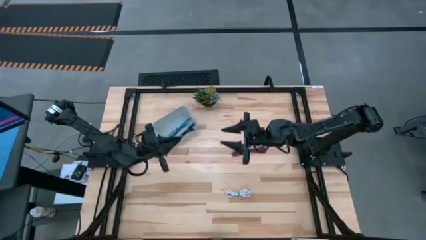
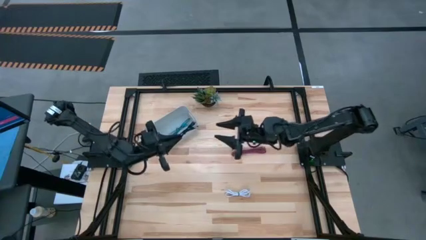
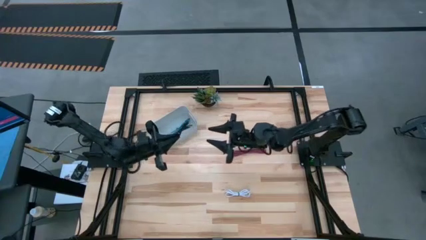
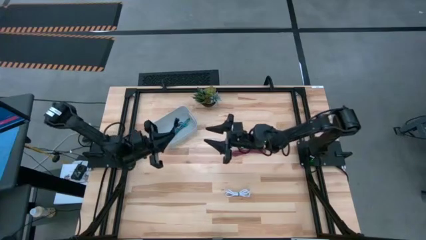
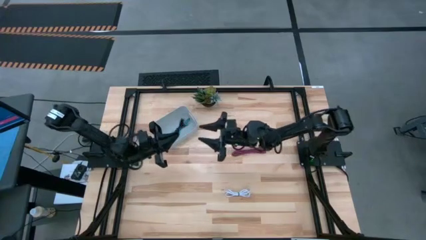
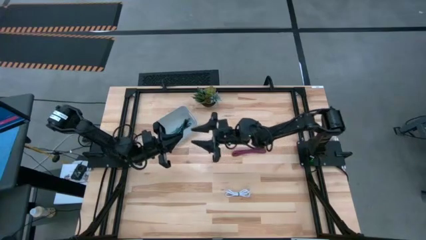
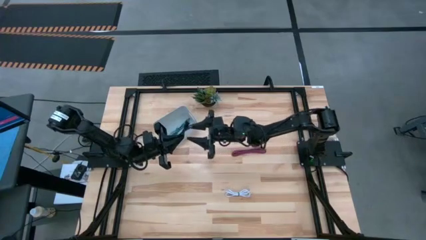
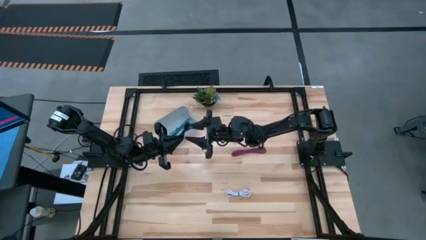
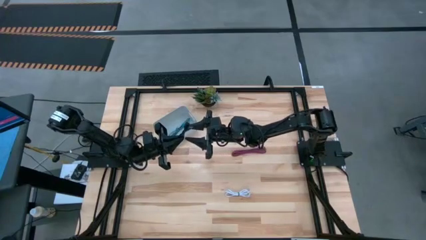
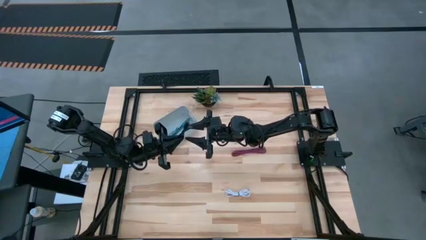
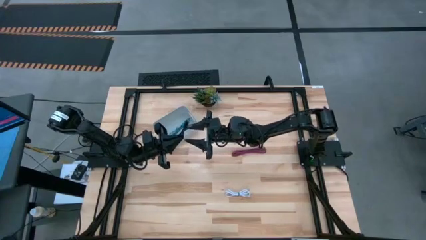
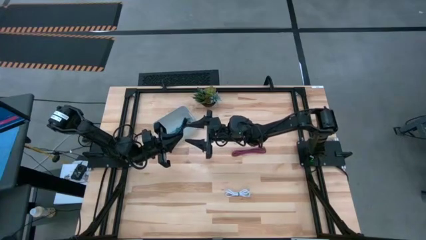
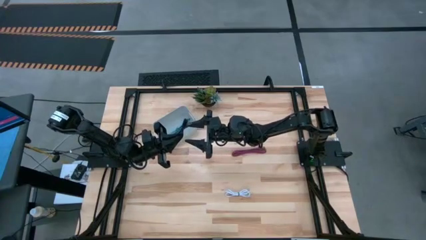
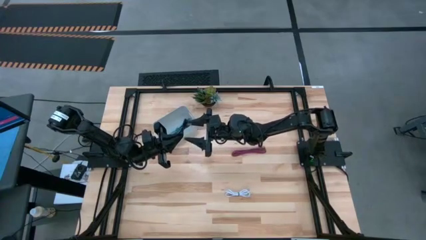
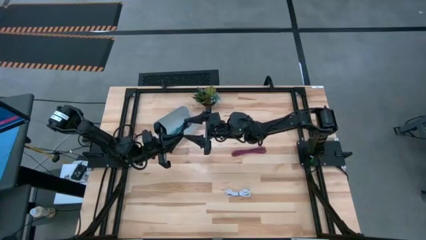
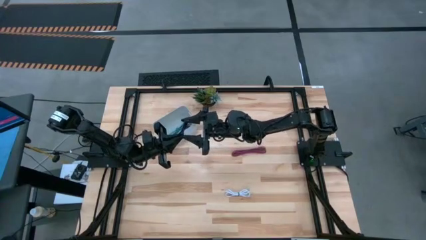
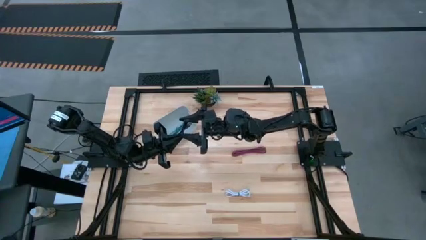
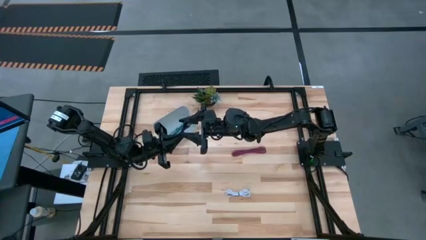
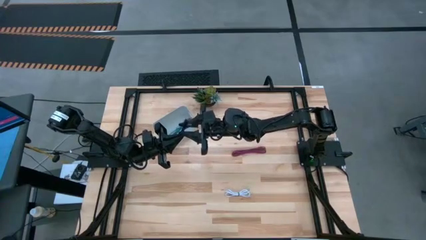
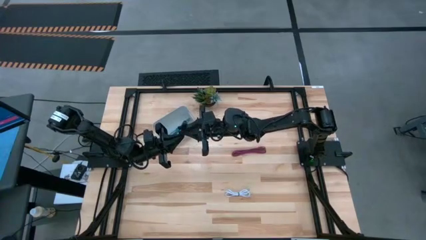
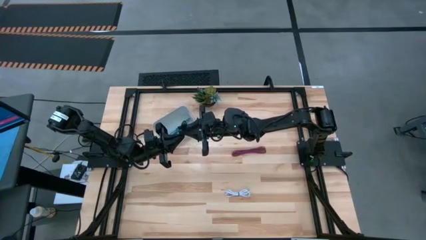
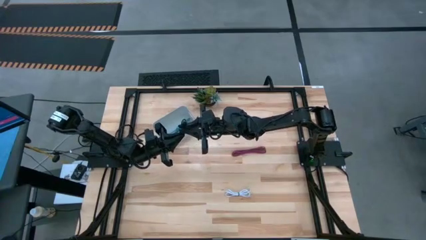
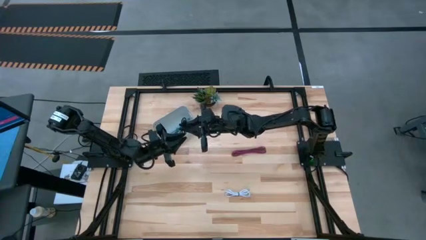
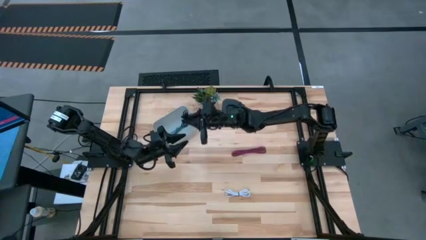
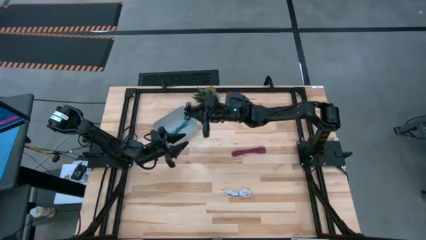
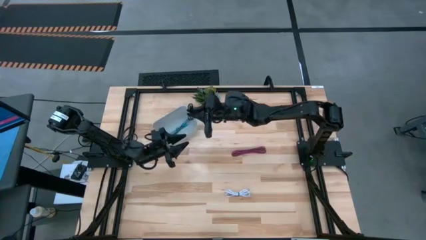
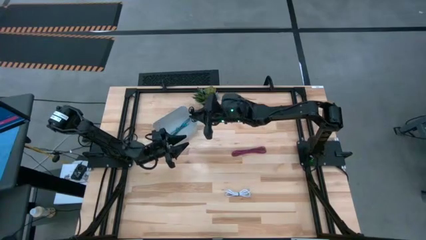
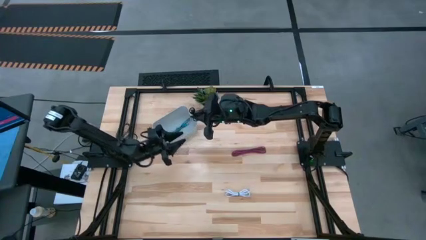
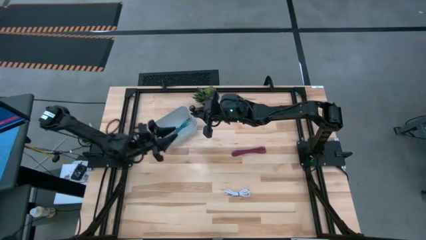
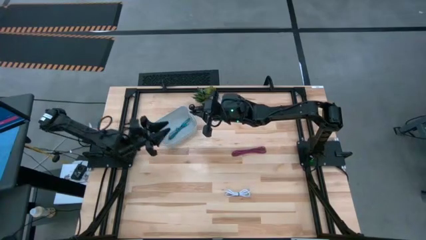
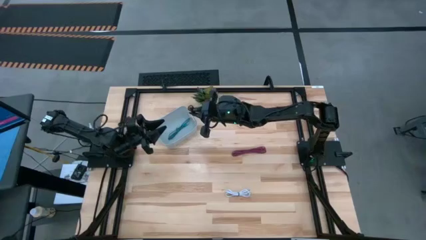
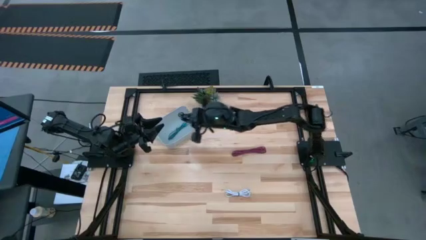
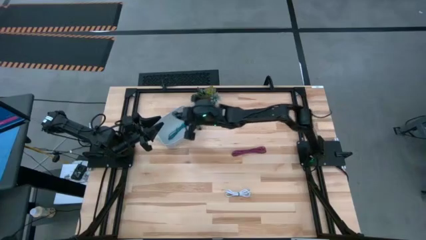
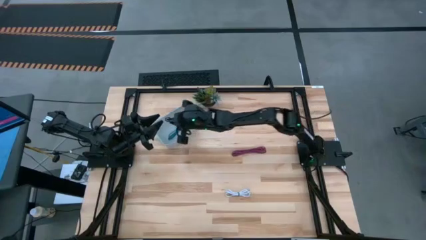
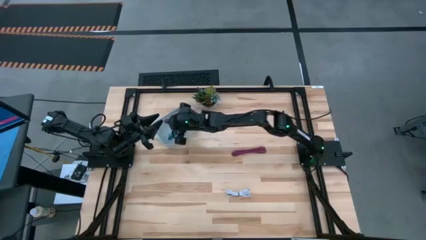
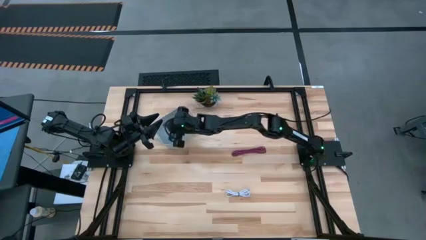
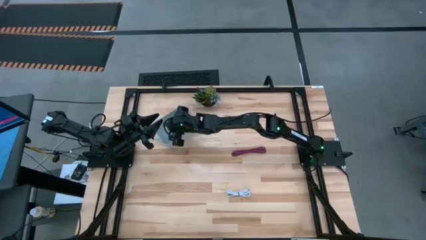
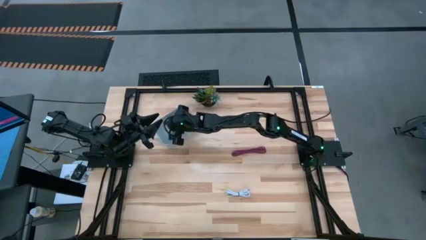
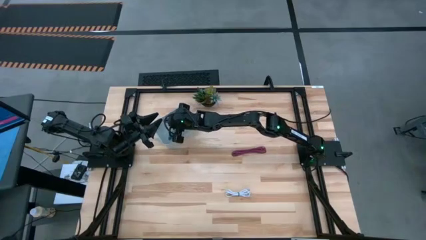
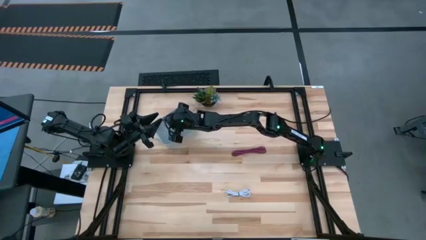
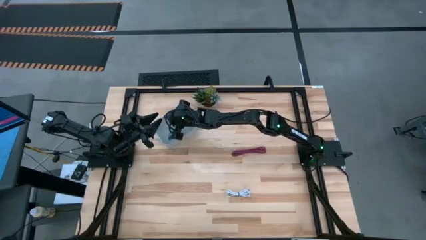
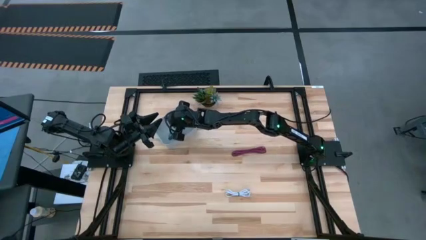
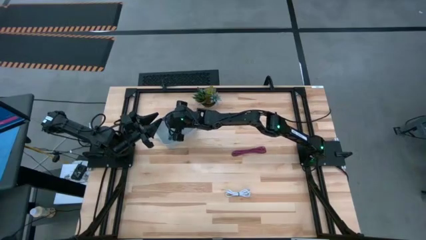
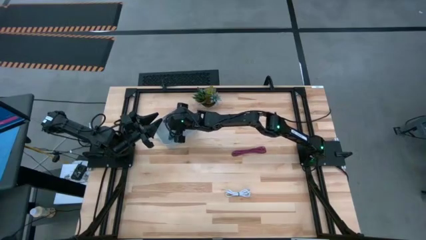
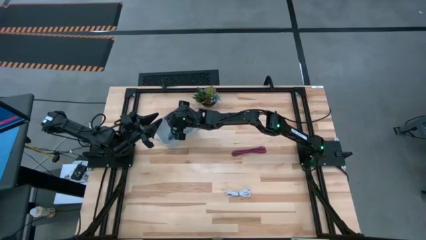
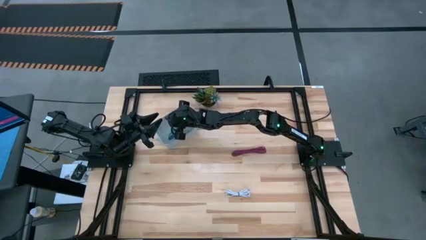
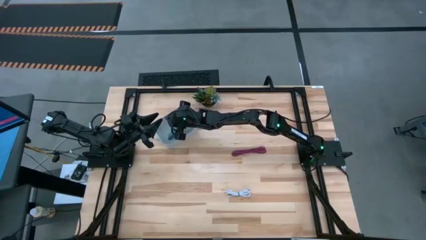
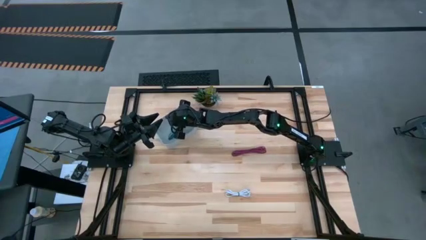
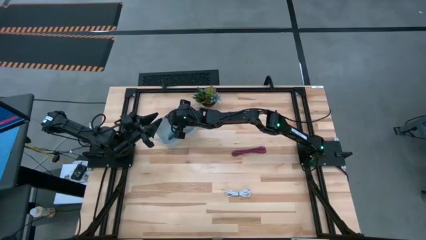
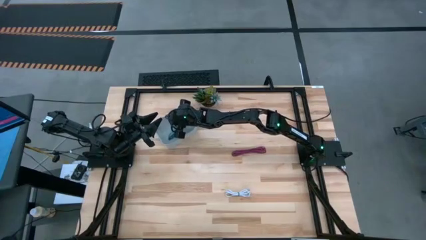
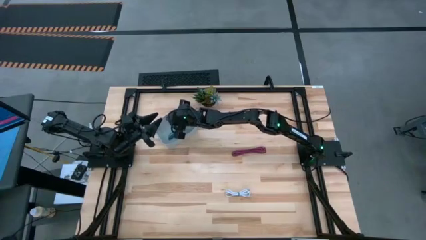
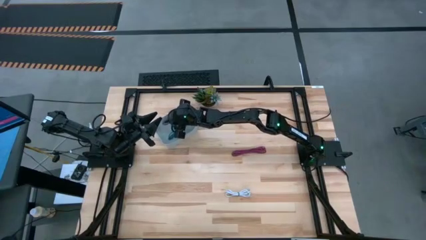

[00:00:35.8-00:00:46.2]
Task: Pick and place USB-C Cables
Put the black charger cable into the white bin

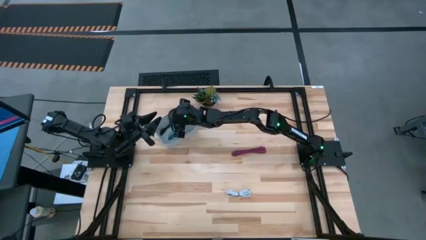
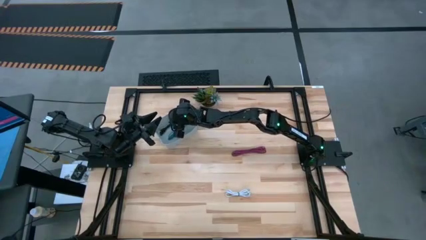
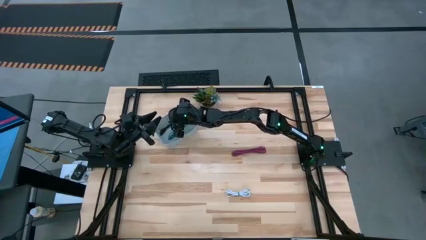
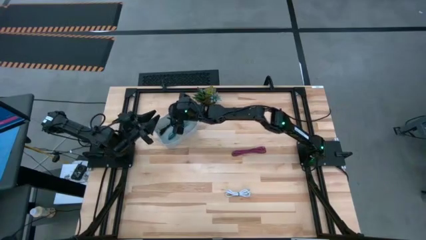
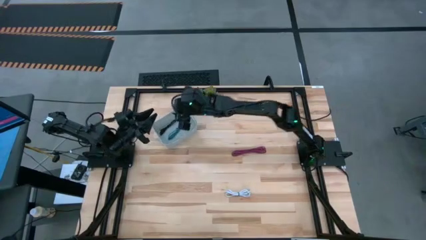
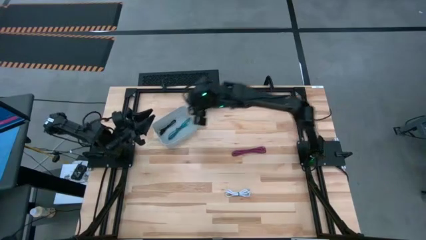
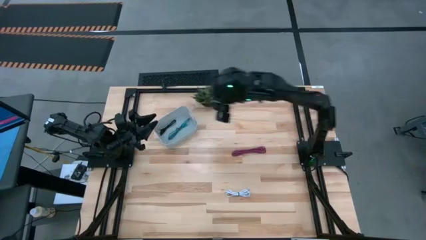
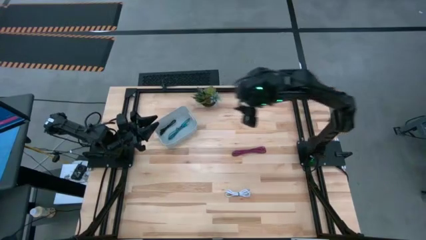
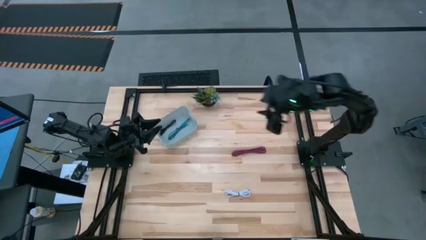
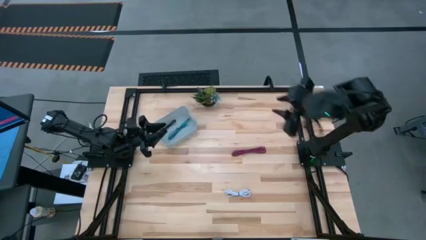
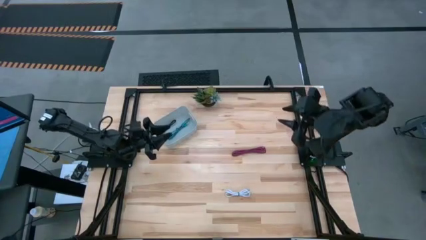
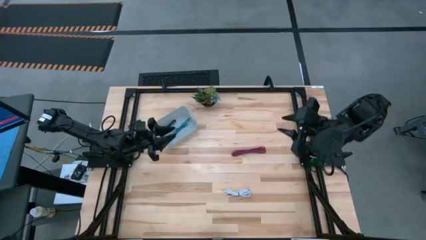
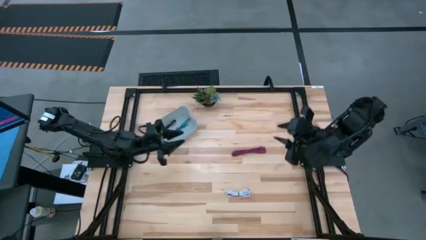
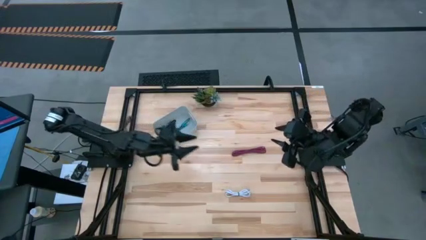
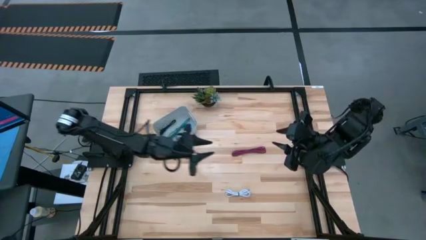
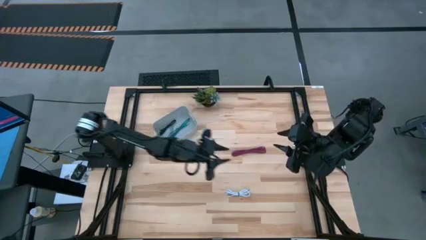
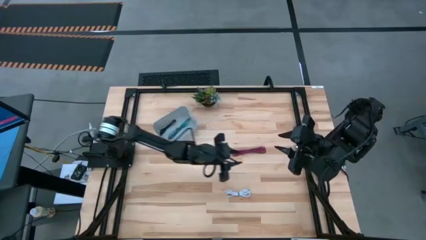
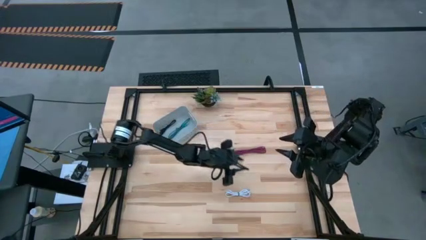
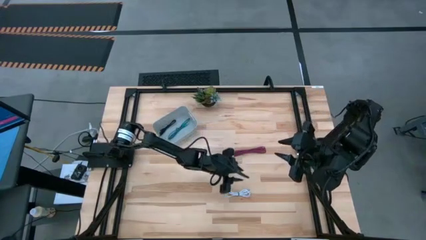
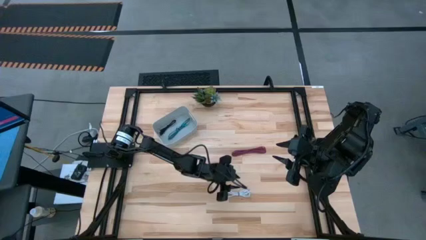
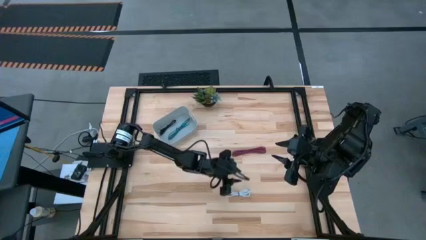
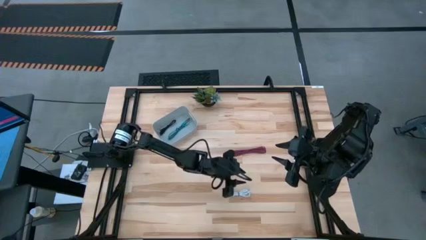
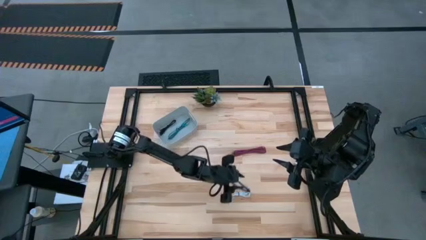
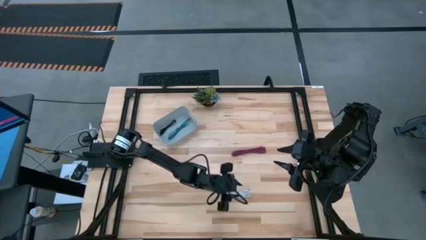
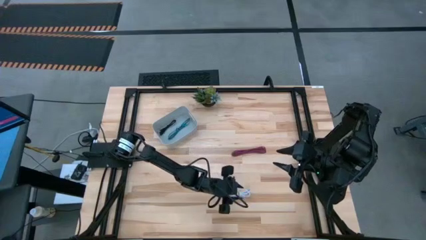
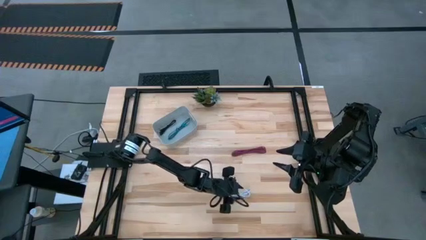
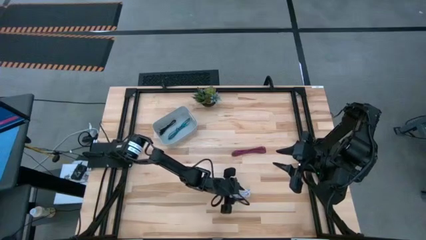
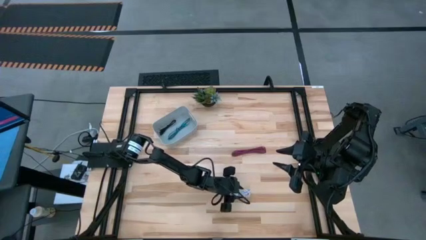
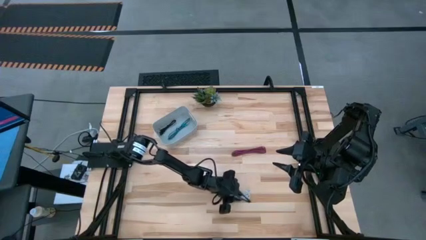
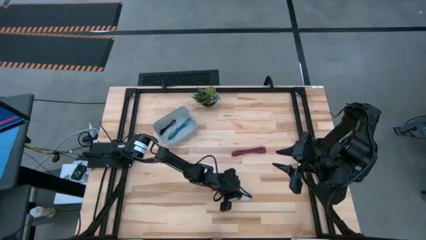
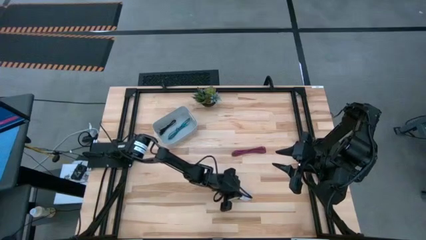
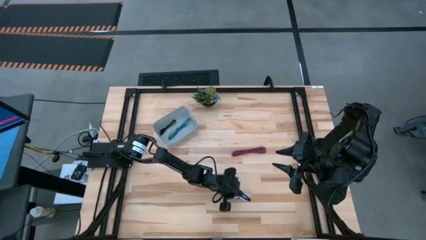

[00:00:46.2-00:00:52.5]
Put the white charger cable into the white bin
